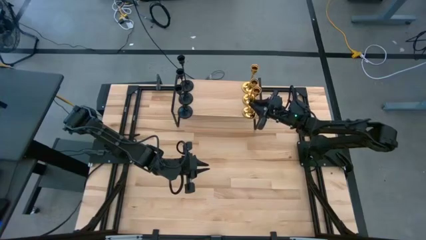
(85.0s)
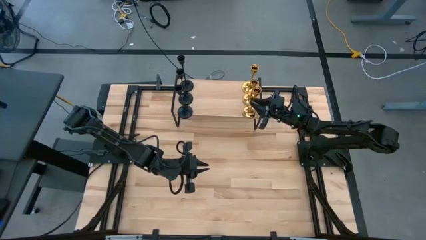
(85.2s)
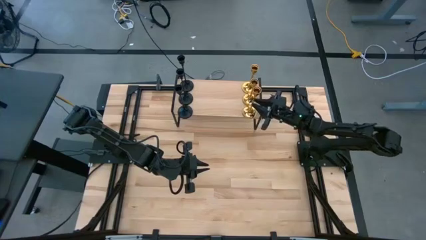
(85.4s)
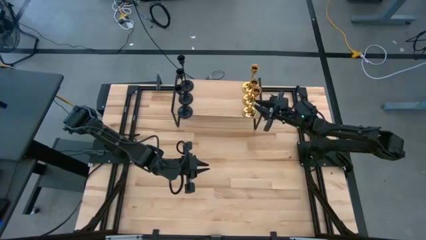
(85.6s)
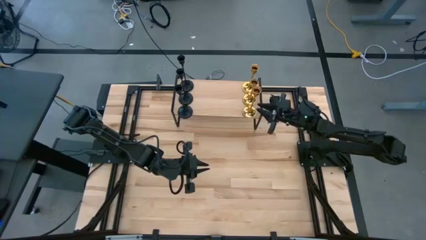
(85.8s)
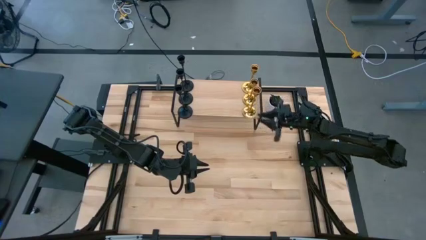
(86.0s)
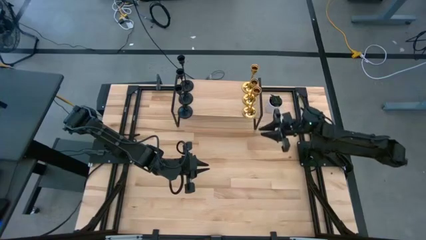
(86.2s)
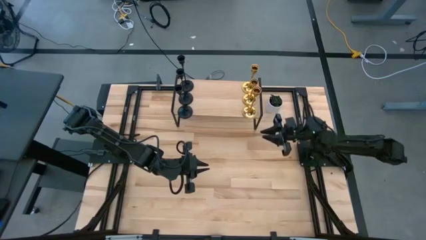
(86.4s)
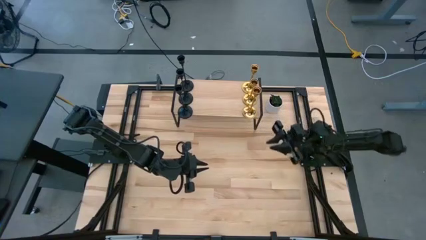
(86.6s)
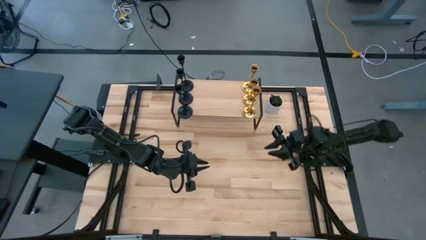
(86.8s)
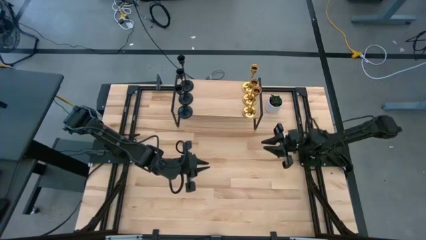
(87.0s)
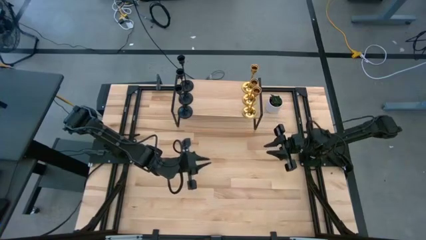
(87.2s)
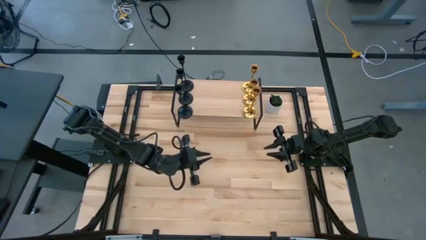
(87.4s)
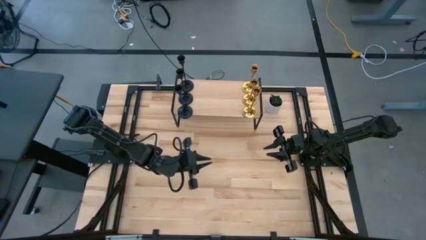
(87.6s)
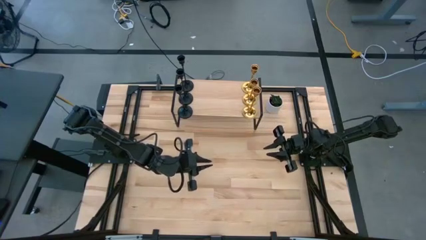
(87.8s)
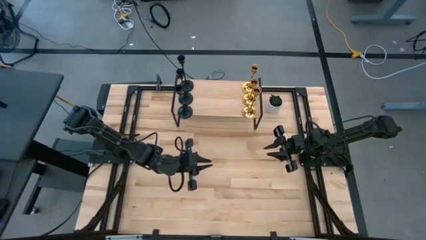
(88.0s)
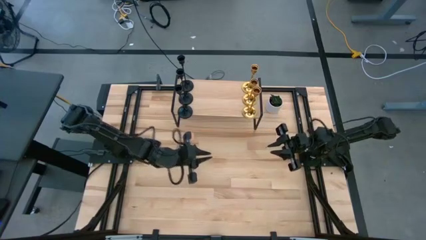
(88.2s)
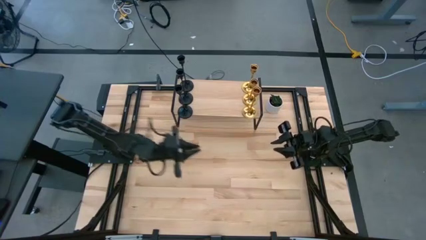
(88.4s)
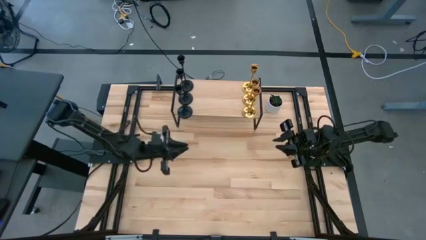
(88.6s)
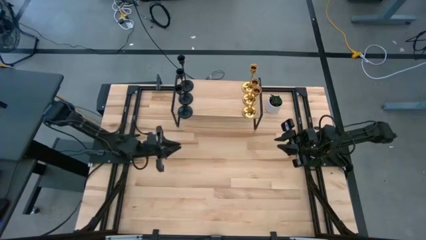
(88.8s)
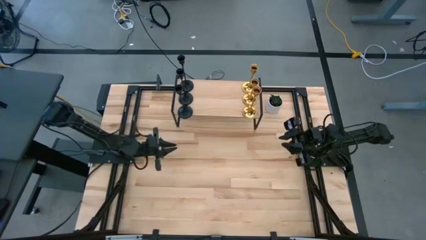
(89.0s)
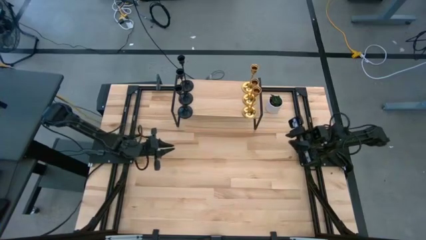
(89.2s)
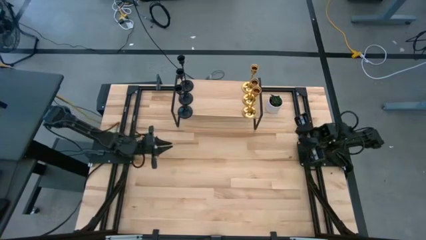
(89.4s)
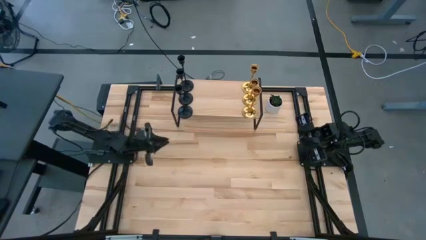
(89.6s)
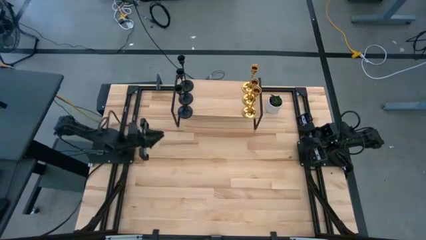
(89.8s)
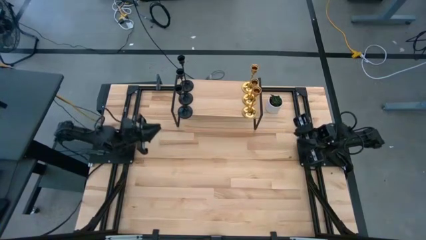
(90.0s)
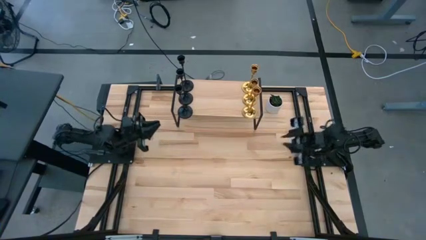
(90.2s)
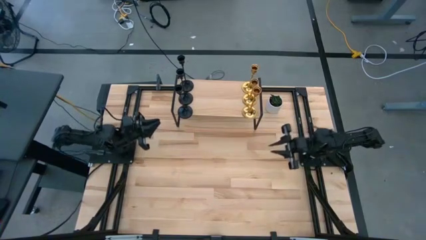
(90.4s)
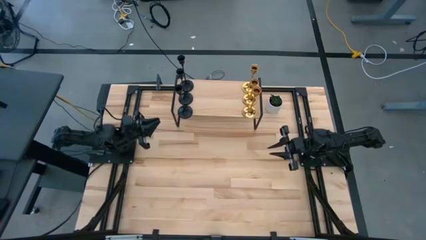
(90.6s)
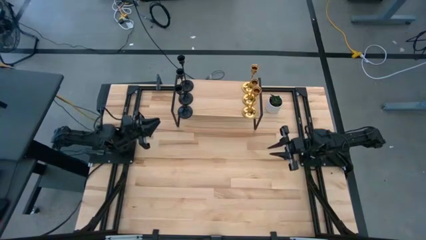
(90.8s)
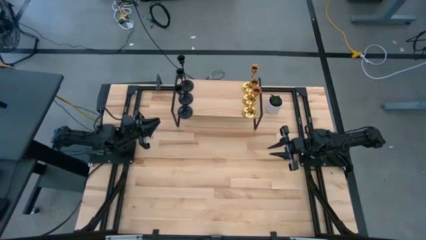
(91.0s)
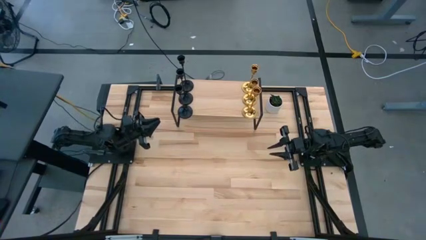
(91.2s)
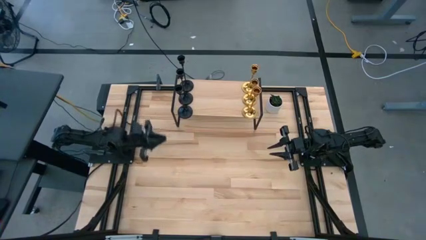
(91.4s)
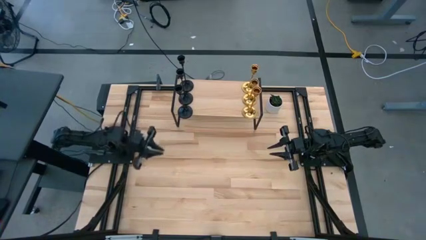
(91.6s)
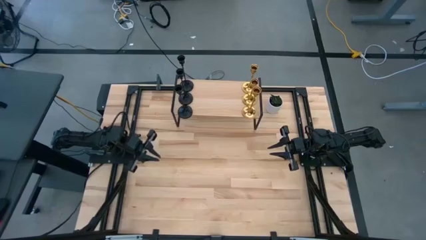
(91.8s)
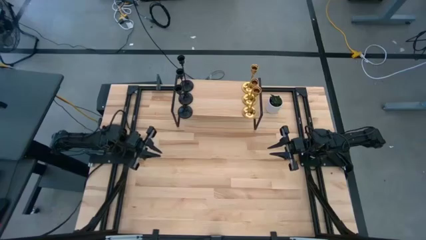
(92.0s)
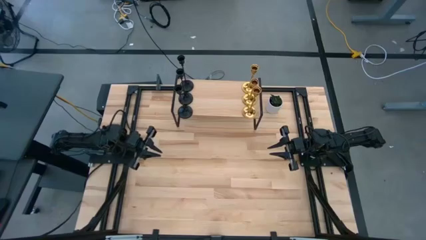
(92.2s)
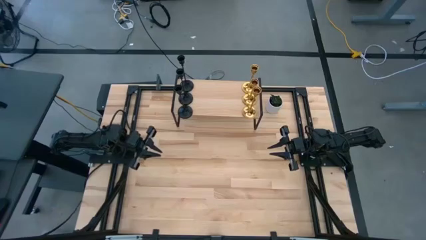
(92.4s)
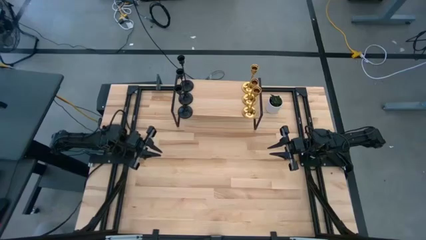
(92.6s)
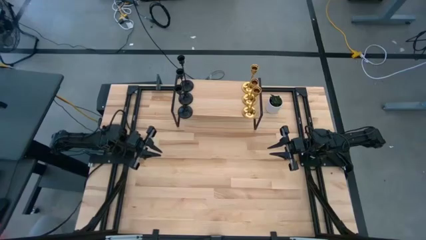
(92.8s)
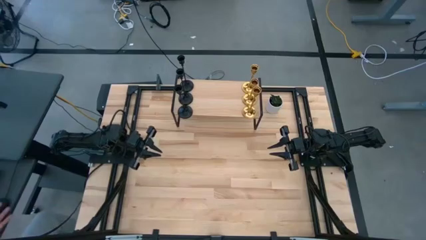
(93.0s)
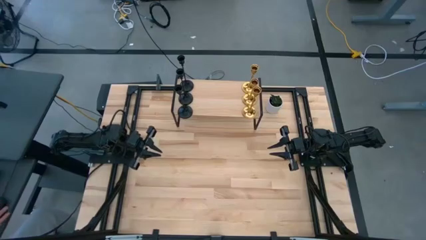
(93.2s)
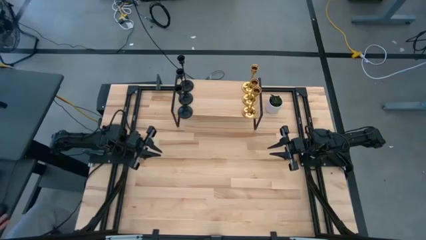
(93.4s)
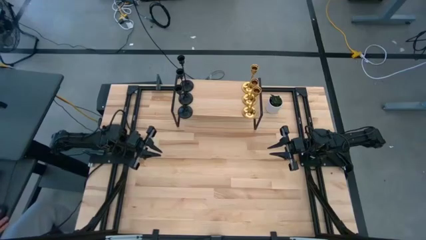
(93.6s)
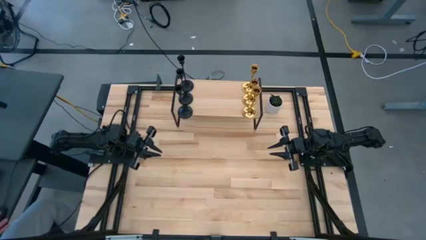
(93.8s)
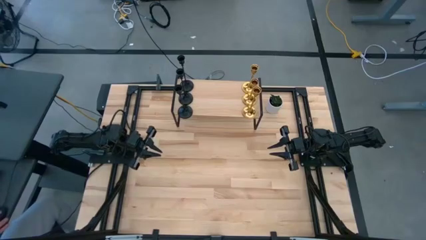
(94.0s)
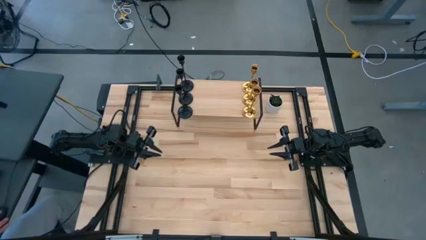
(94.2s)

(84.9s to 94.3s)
Task: Pick & Place candle stick holders
Return To Home Position

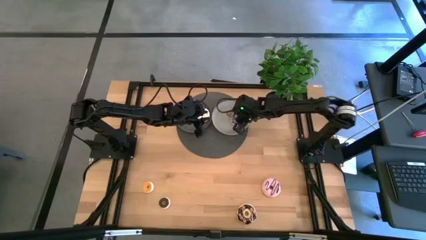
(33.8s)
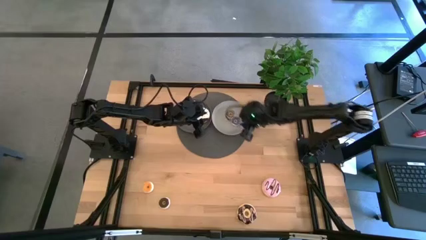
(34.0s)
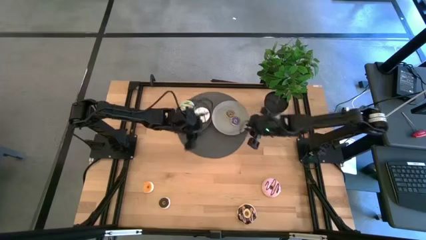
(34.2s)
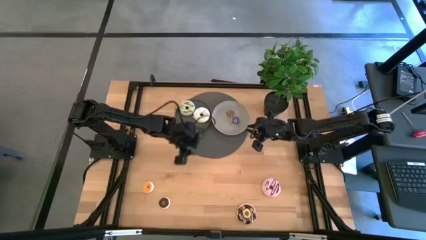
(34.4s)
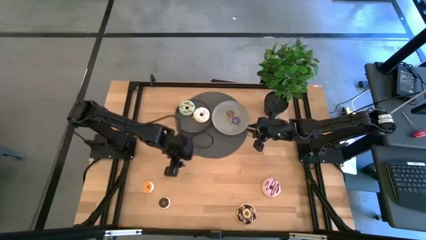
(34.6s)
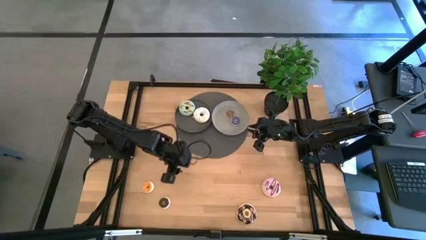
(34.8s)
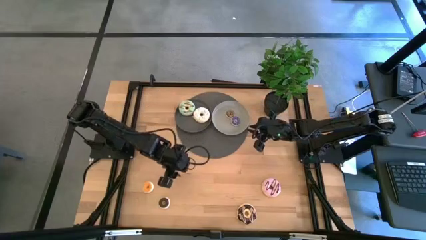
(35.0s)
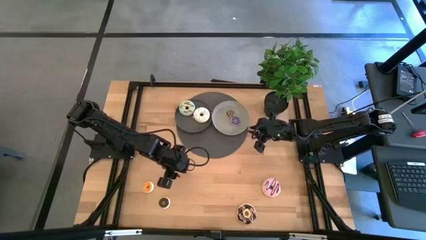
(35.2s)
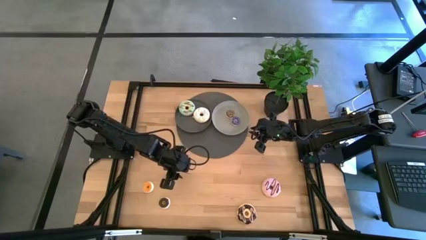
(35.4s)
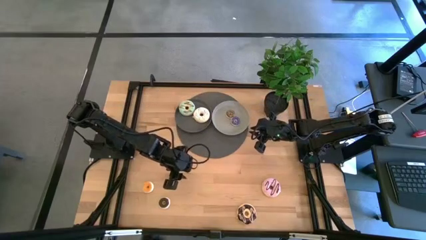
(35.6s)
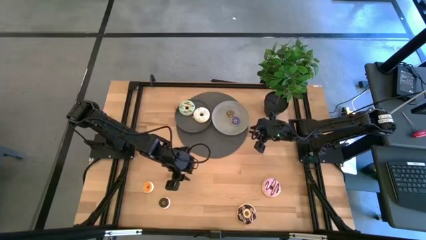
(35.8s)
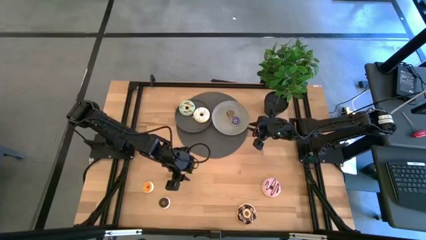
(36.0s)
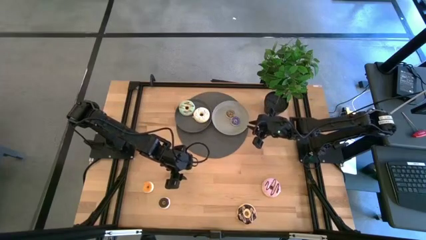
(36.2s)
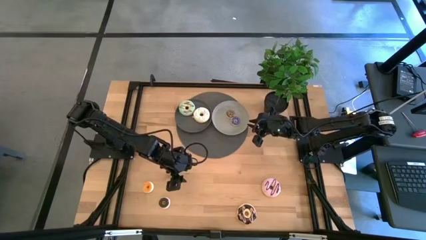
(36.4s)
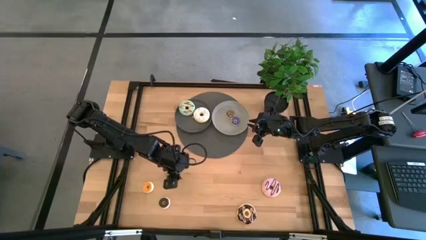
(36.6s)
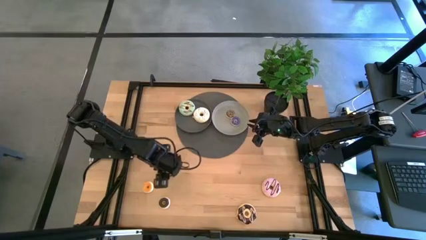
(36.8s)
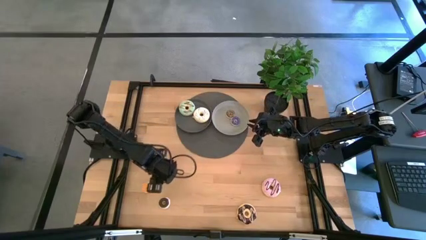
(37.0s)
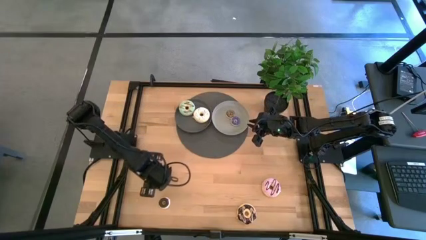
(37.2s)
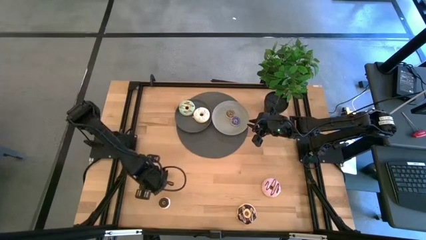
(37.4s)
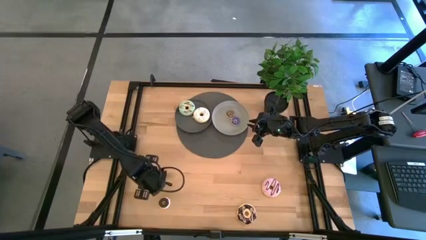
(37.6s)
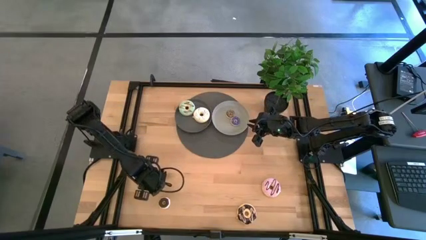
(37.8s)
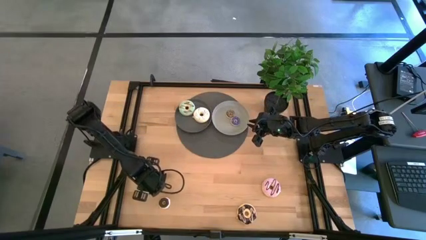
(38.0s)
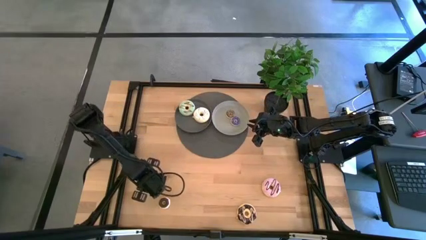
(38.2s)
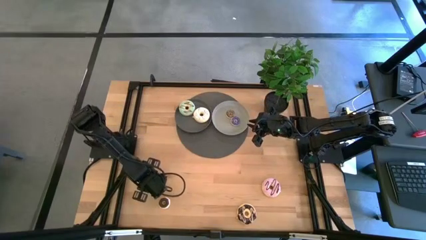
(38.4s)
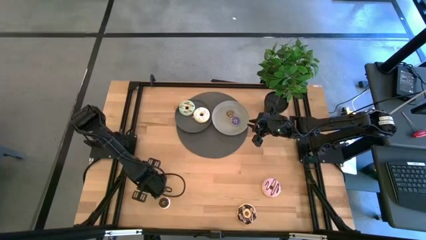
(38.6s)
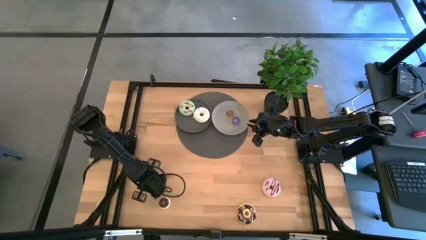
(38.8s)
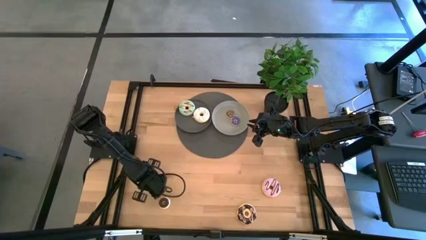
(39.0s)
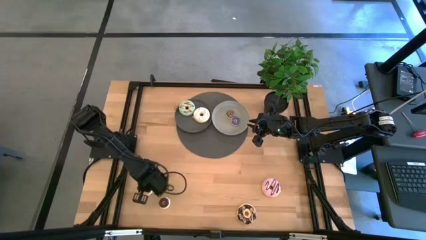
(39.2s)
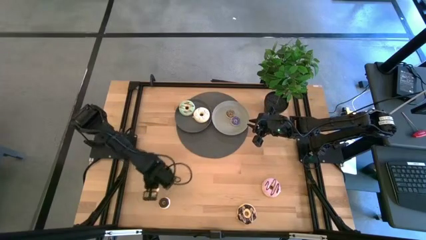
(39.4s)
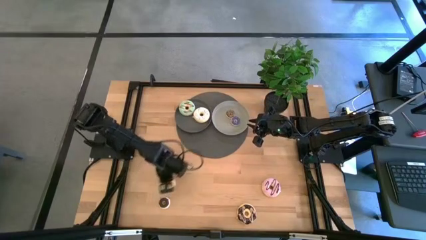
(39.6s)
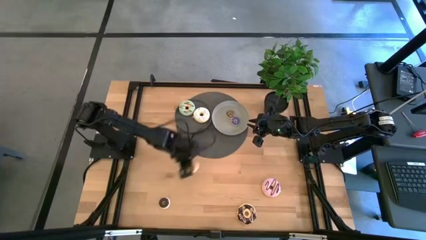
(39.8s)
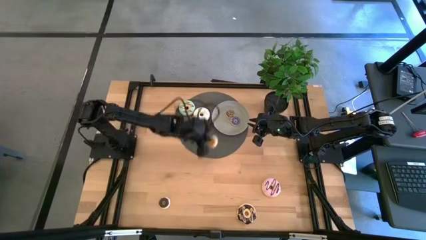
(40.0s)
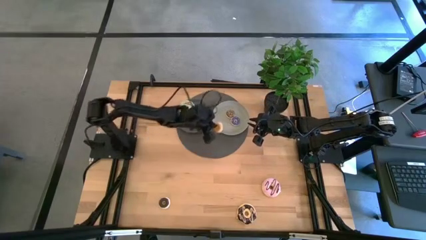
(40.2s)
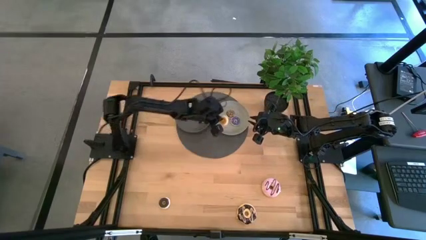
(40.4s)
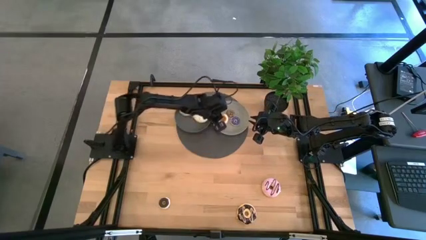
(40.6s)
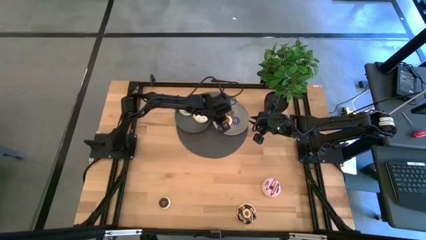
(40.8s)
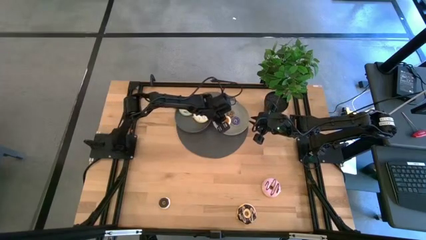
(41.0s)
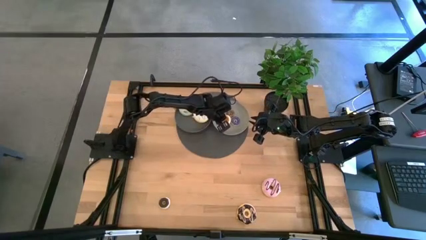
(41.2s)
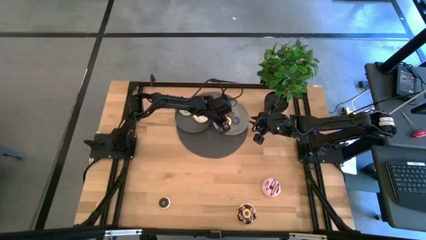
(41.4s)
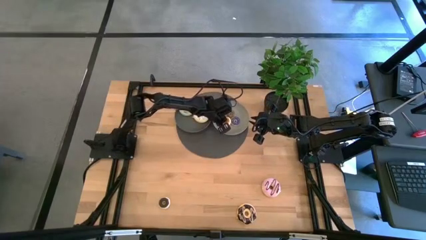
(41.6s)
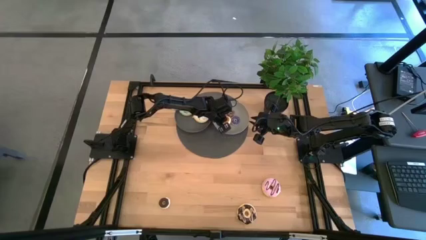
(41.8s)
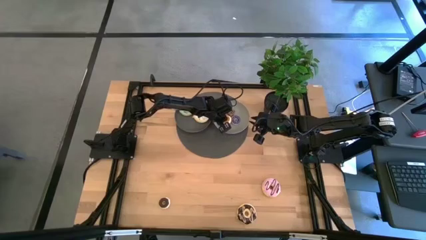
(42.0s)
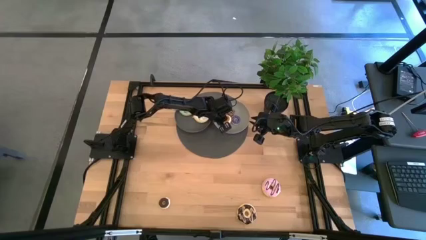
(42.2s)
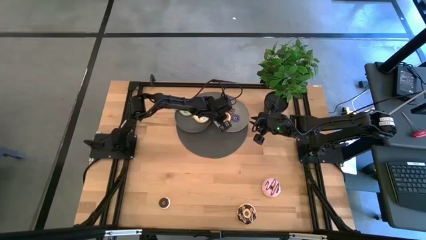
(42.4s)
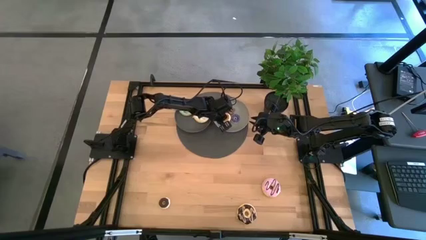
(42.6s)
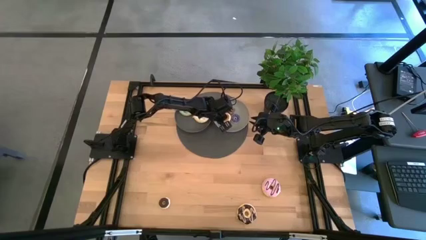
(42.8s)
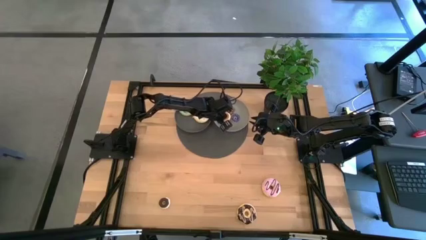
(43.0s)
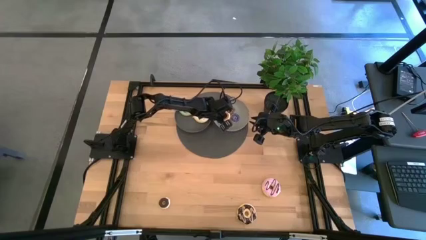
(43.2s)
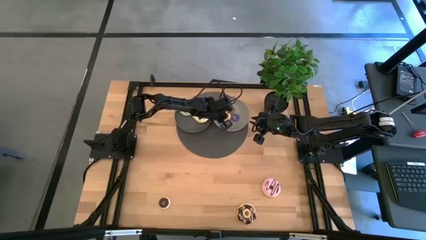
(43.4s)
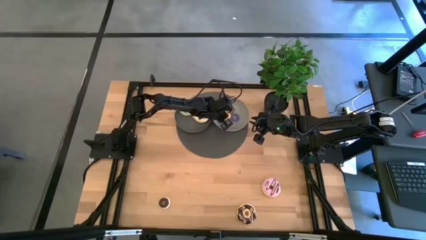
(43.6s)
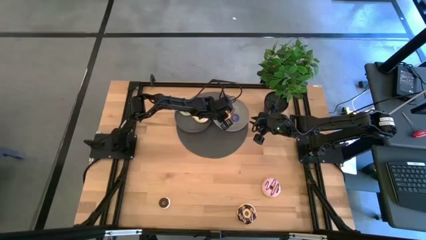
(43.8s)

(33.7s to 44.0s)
Task: Pick & Place donuts
Put the small yellow donut on the gray plate
